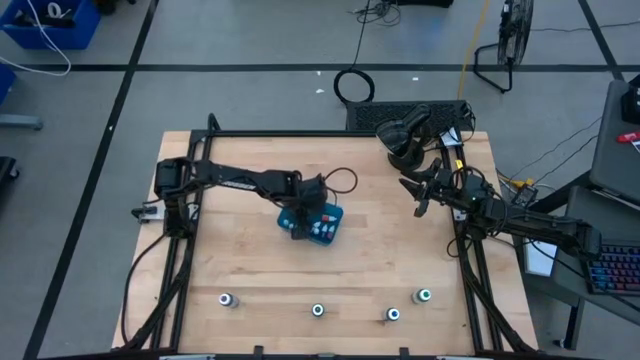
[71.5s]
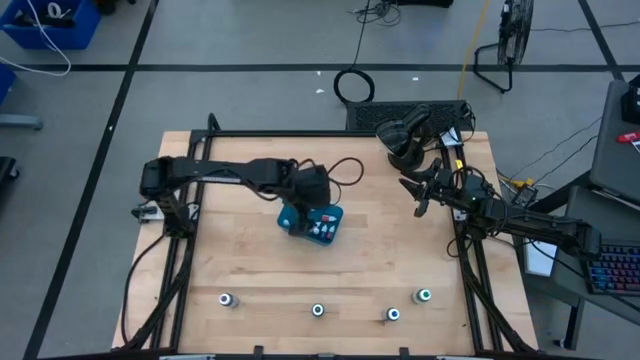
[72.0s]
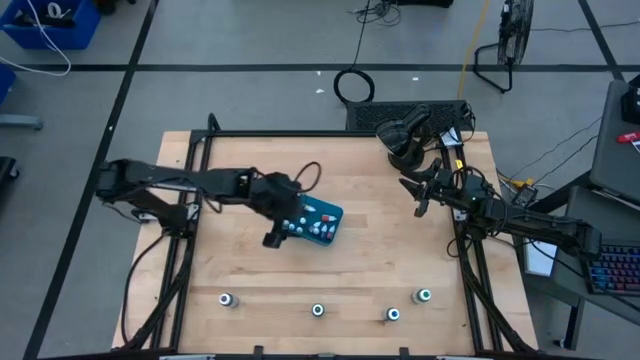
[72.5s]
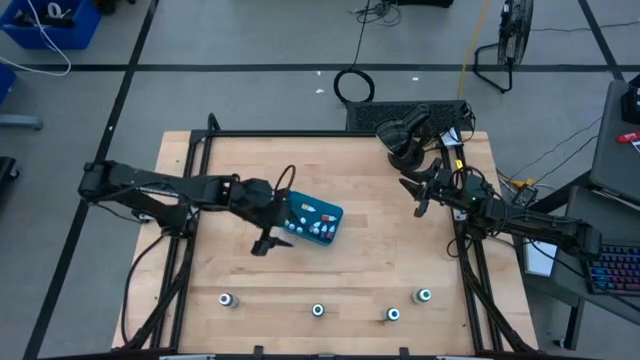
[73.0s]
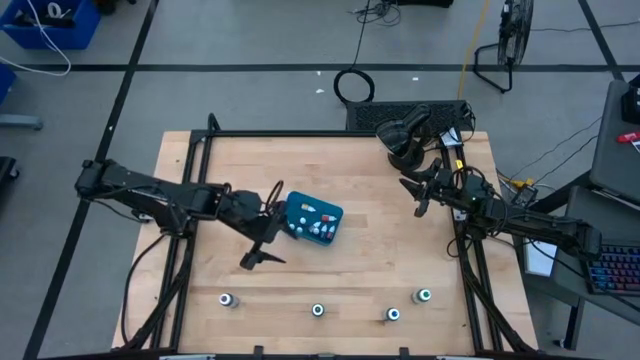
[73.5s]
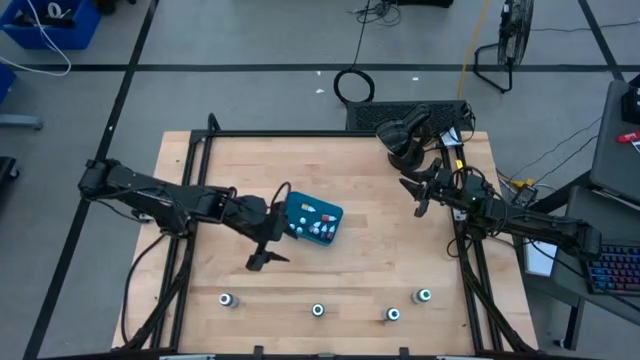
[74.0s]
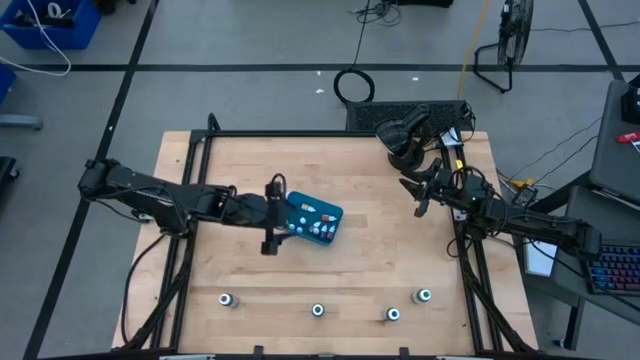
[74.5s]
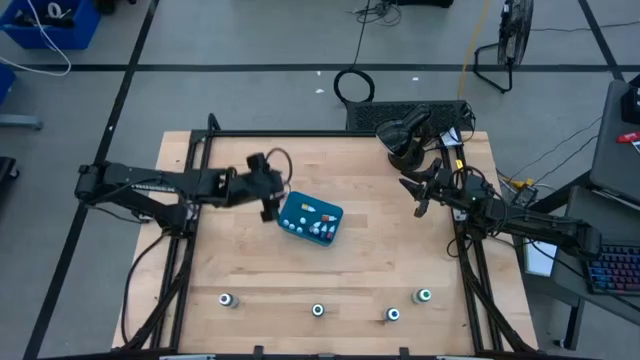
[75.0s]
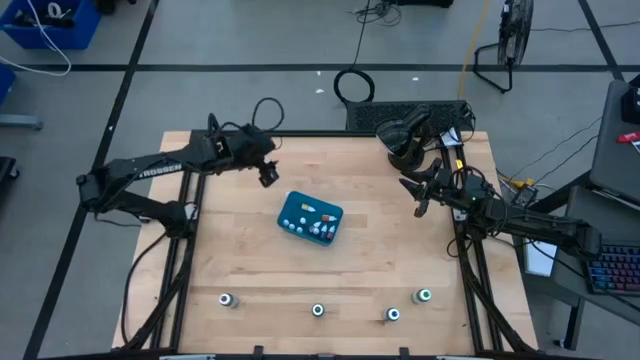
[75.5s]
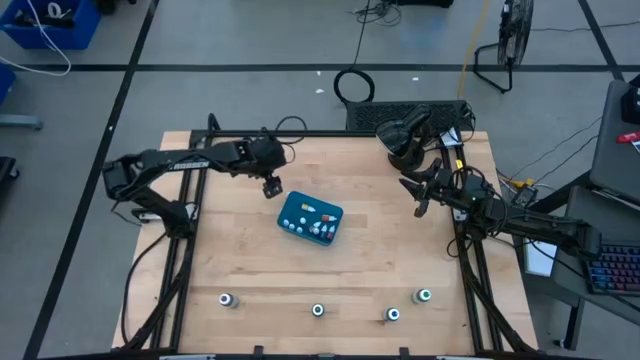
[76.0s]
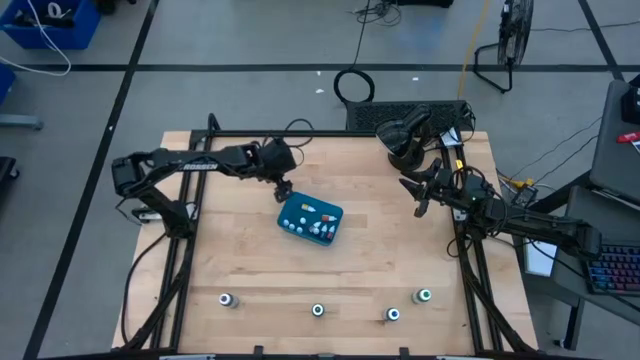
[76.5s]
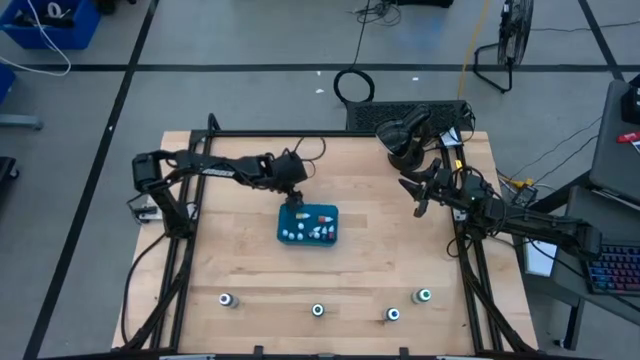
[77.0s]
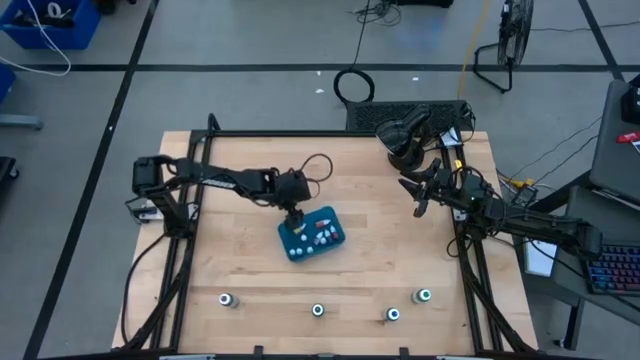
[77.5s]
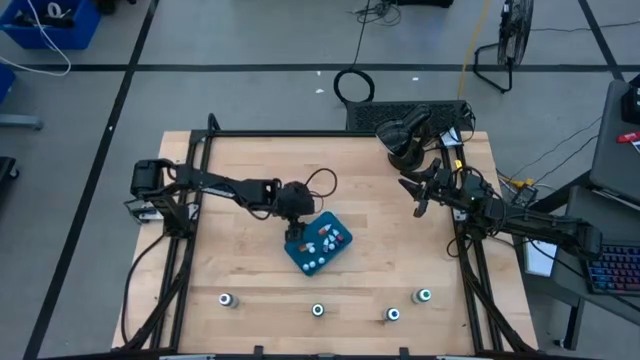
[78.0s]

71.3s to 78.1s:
Task: Pick & Place food coloring
Adjust the blue bin on the table

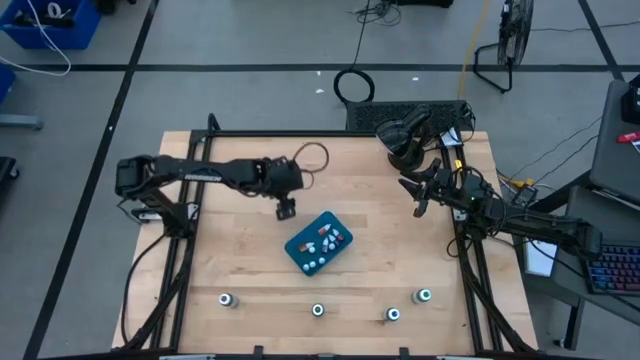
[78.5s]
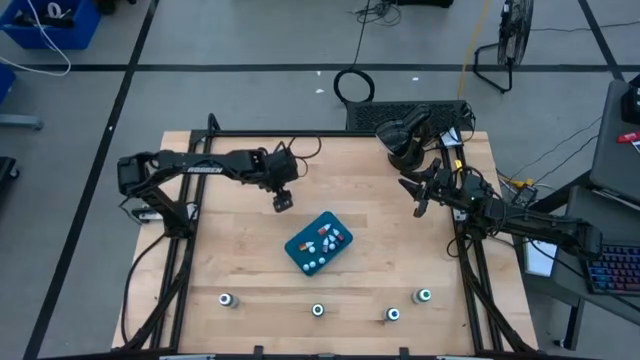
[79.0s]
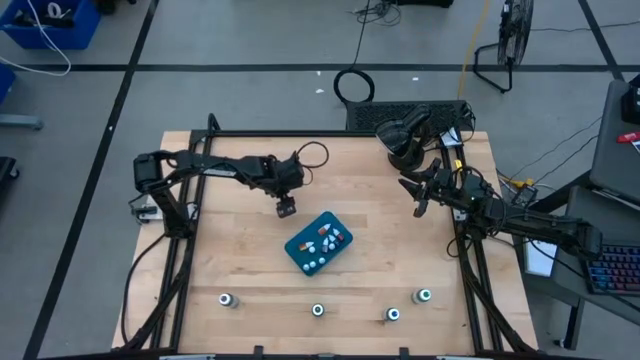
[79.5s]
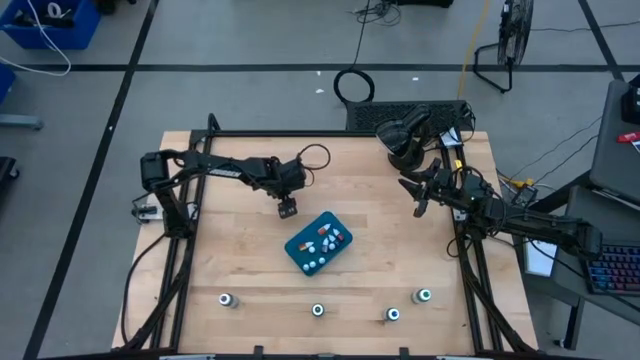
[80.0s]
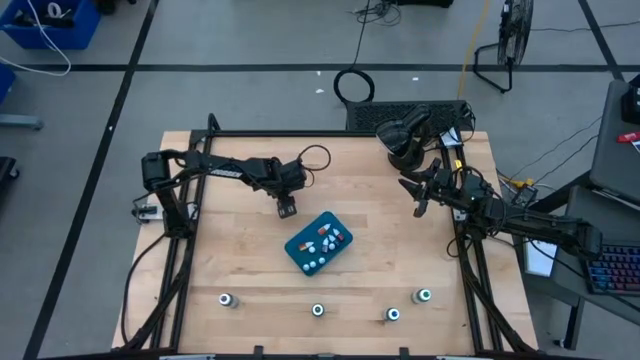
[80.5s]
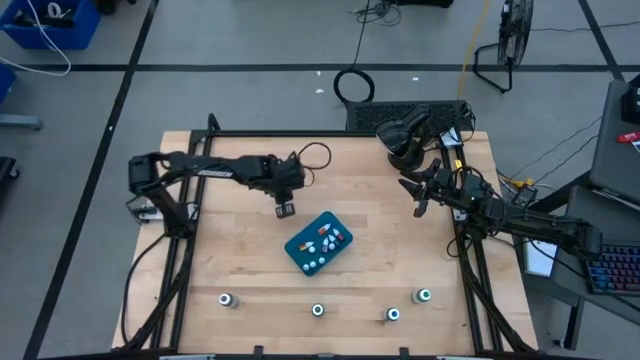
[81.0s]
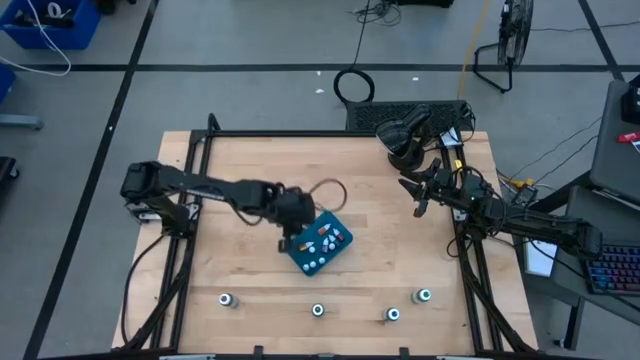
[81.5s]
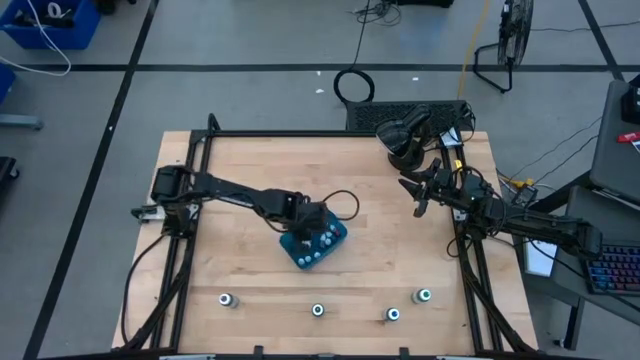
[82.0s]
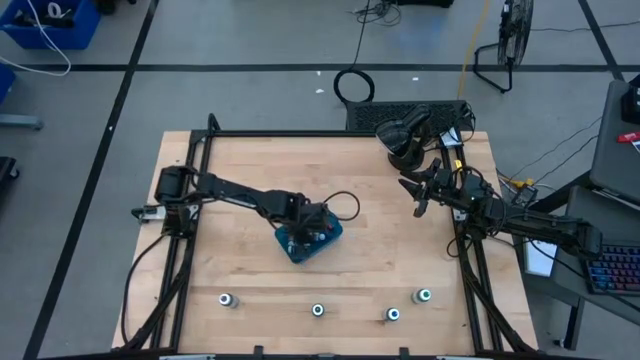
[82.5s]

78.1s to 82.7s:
Put the orange food coloring bottle into the blue bin

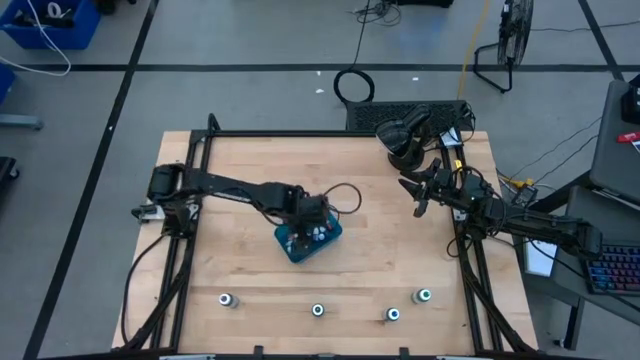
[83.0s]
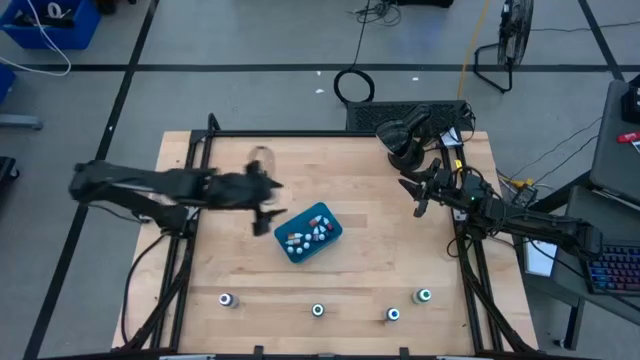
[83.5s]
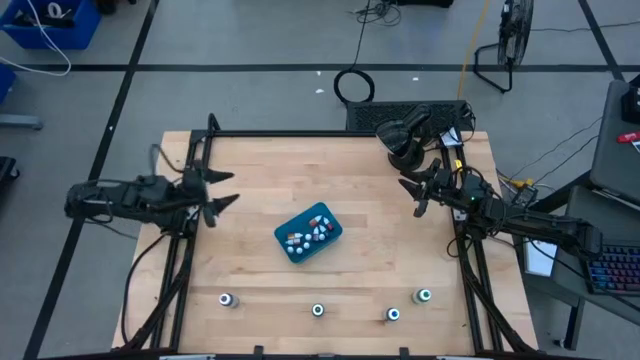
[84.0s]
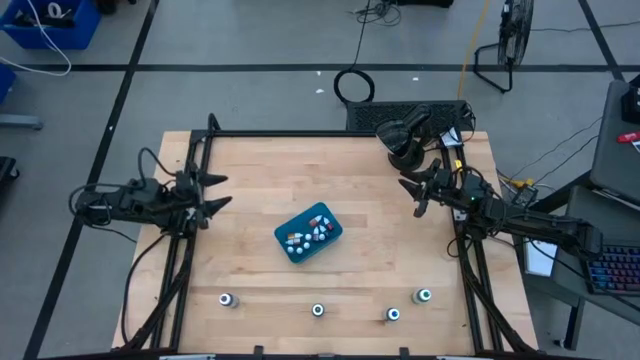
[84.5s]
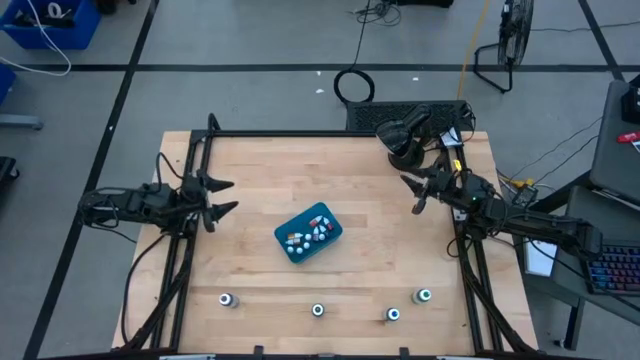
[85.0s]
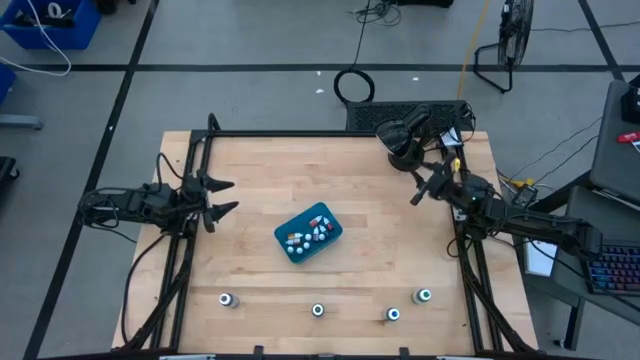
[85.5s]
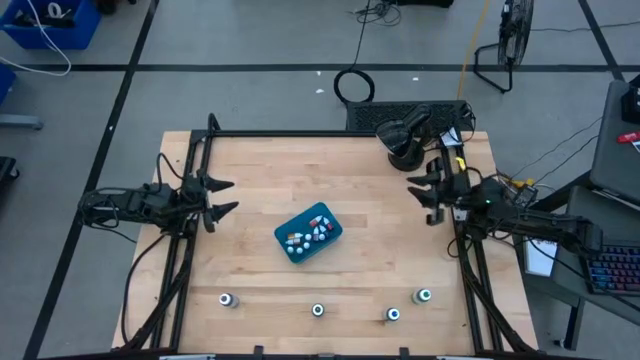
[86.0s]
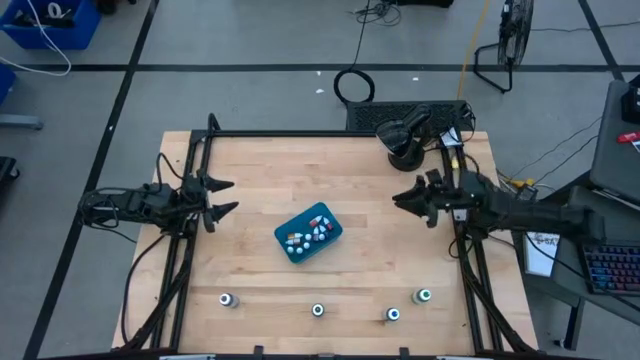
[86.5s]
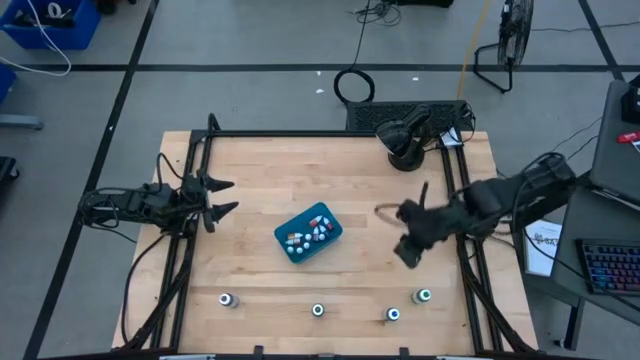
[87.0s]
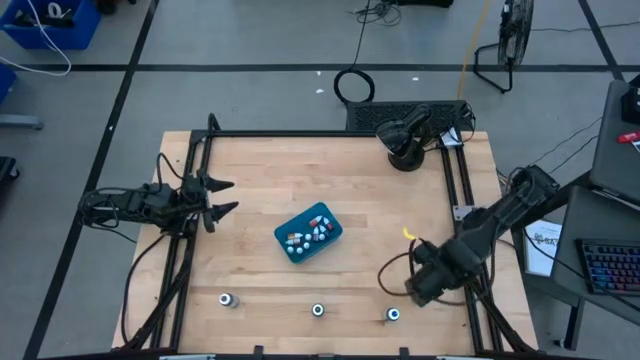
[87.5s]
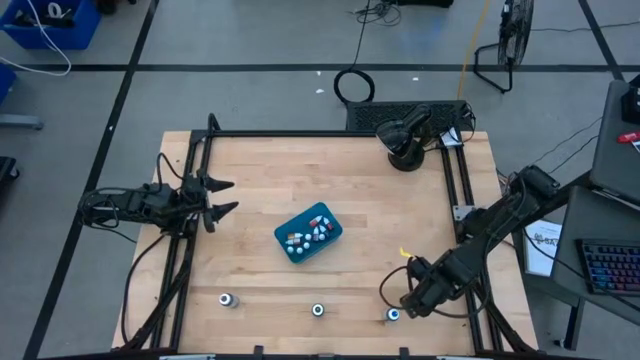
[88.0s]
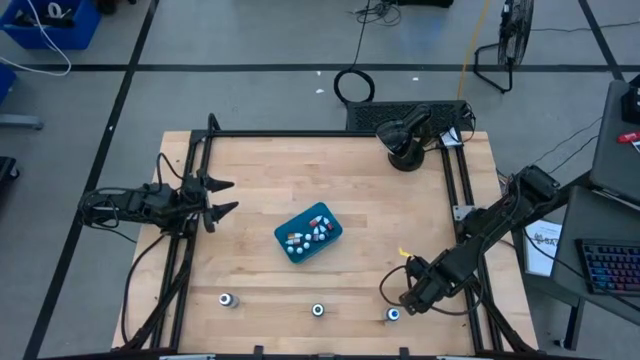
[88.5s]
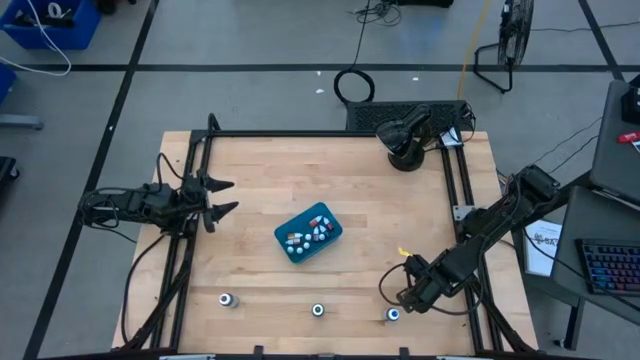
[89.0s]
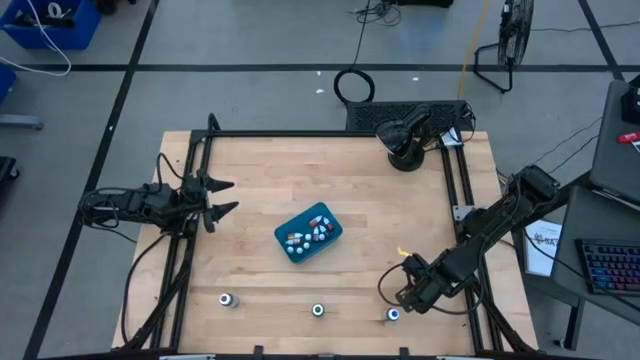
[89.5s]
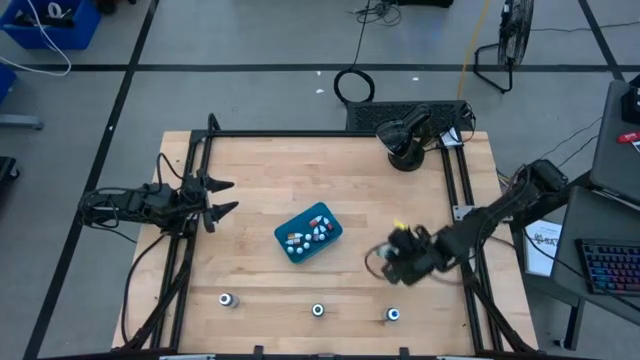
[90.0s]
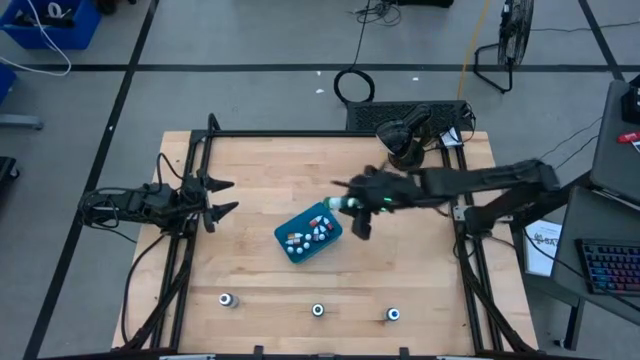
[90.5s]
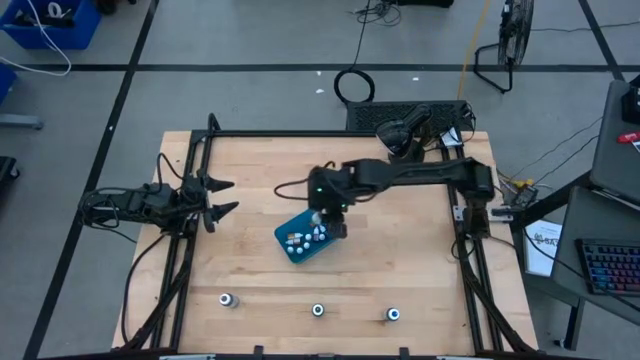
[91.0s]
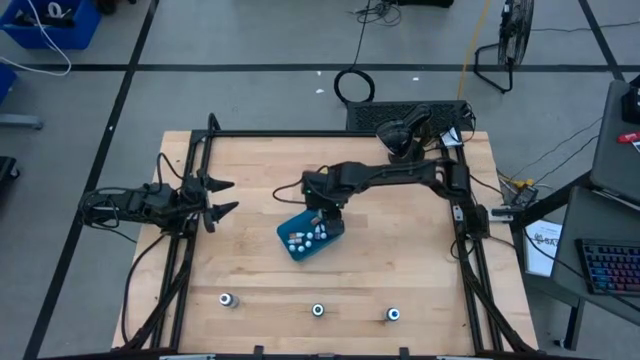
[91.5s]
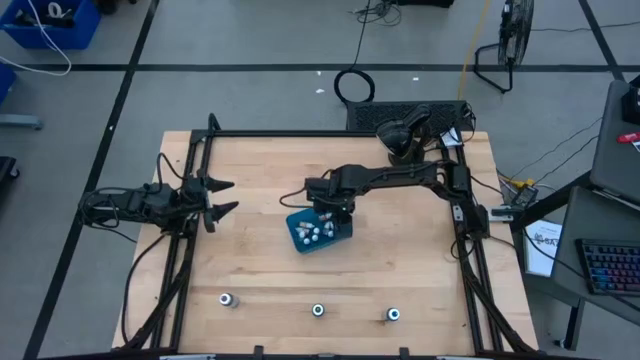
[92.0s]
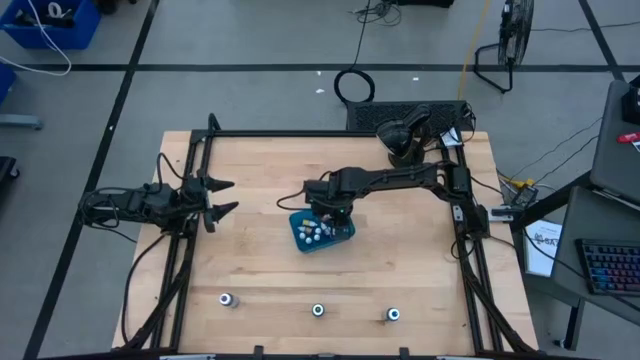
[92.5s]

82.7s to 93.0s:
Put the green food coloring bottle into the blue bin
